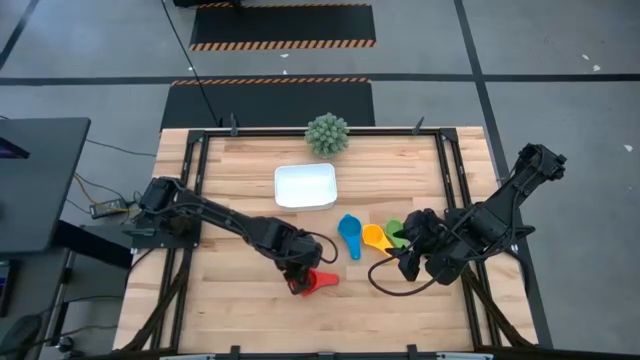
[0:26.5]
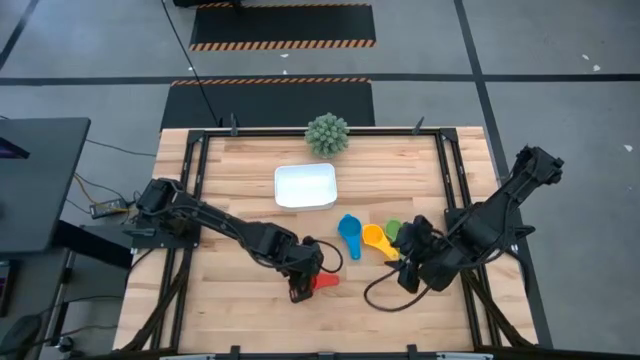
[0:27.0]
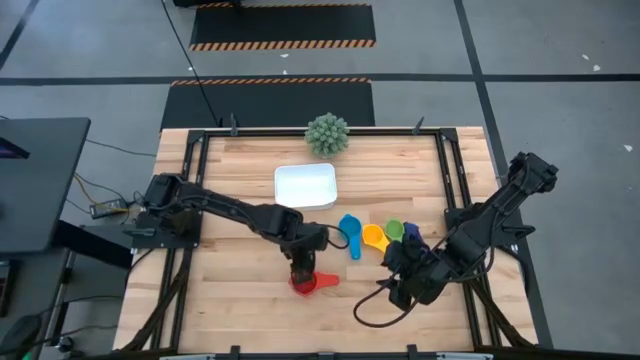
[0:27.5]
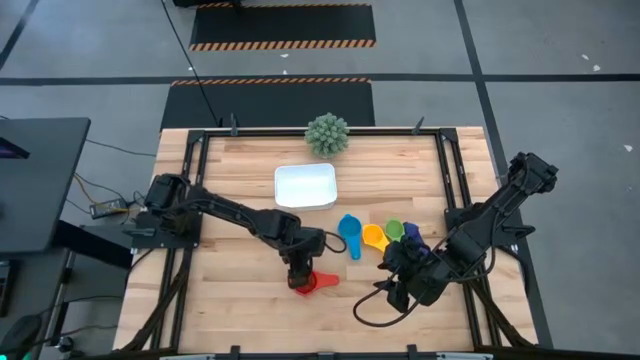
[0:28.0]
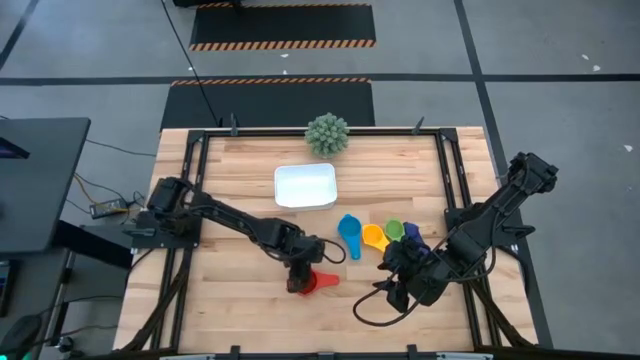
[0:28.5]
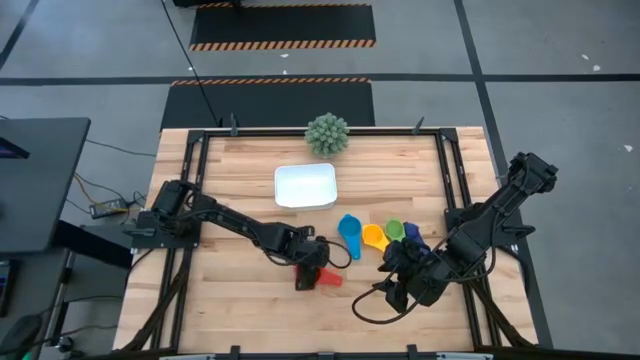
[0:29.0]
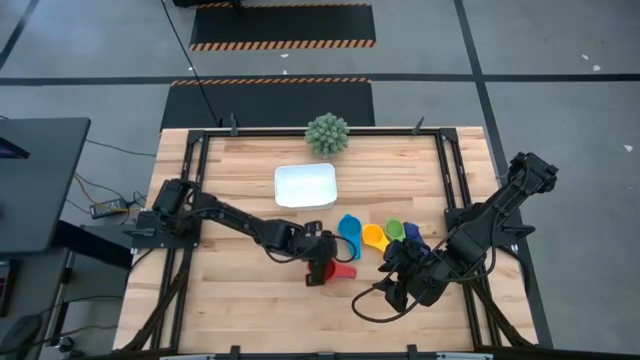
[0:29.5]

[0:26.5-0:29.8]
Task: Nest measuring cups in basket
Adjust the stacked measuring cups

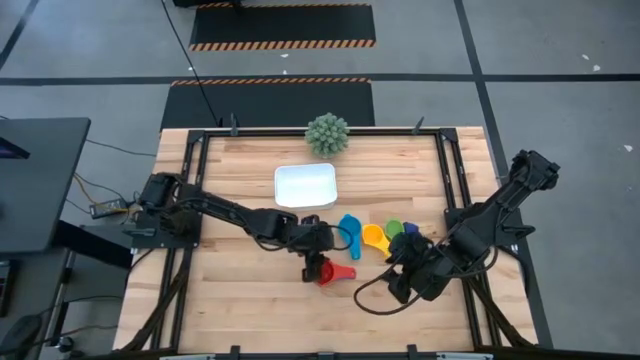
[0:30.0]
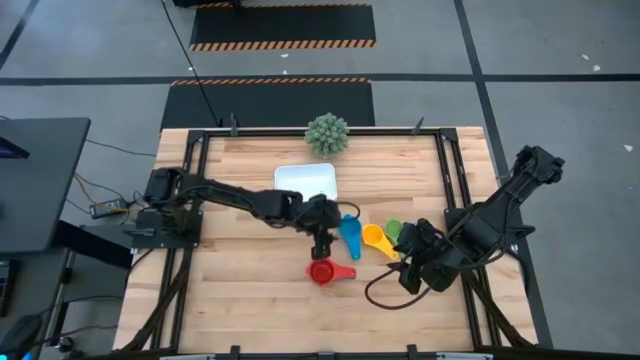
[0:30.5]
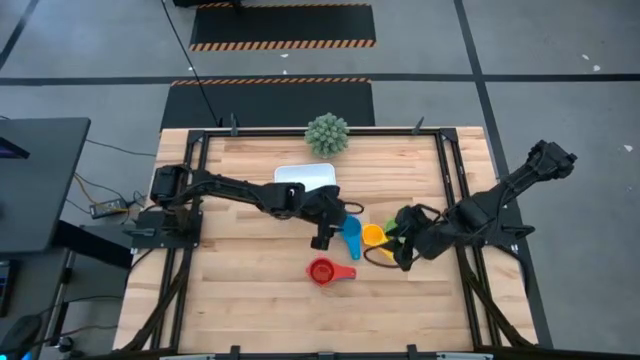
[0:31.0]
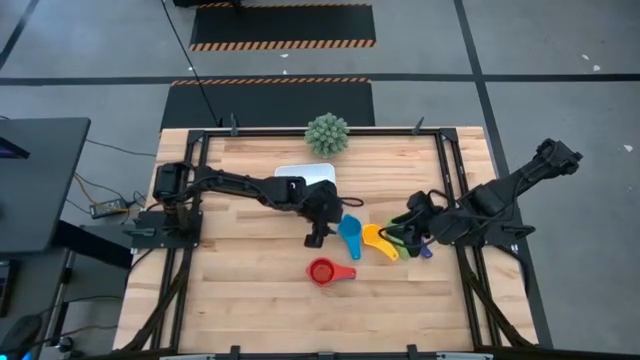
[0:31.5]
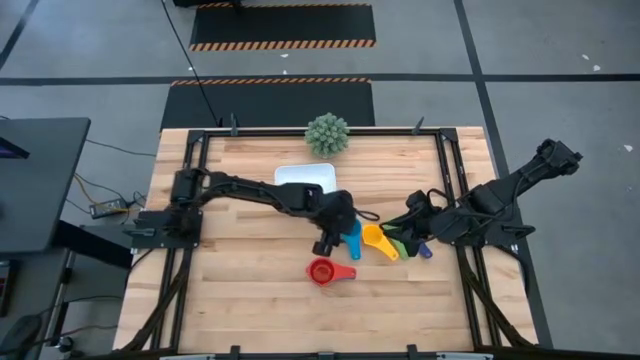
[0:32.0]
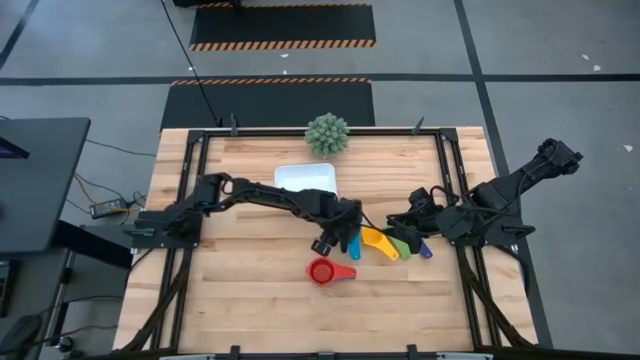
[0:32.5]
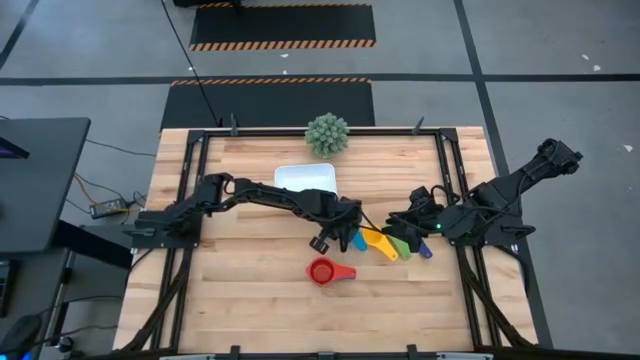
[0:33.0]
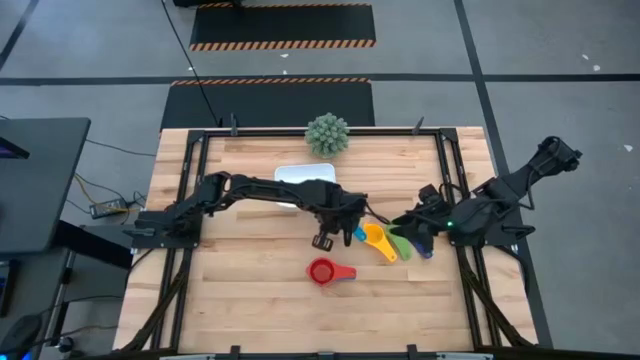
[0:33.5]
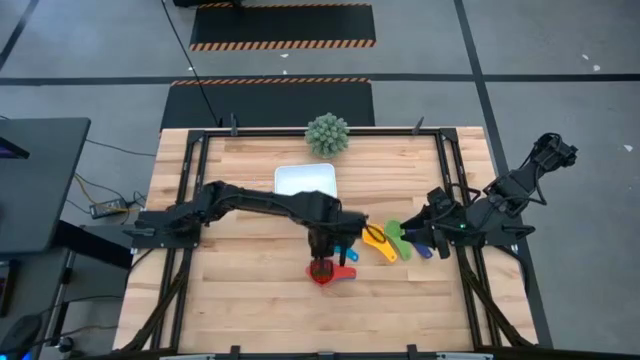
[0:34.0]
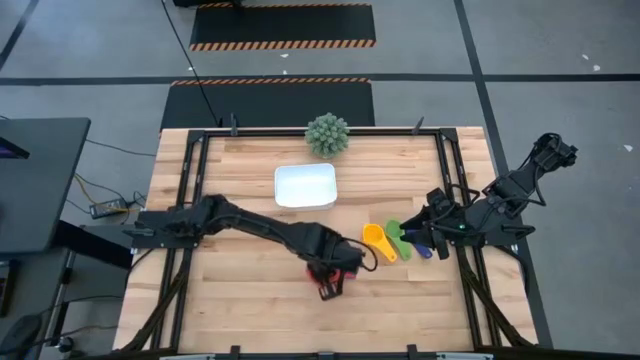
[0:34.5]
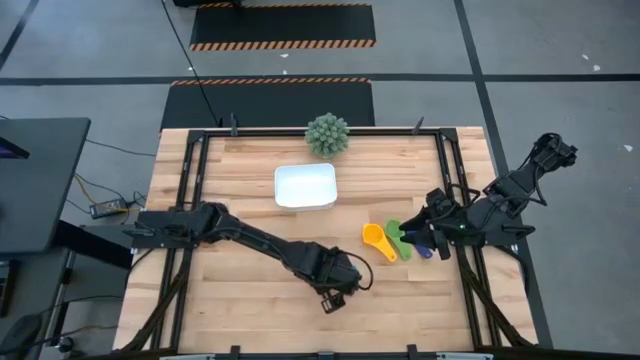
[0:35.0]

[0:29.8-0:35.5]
Stack the light blue measuring cups into the red measuring cup

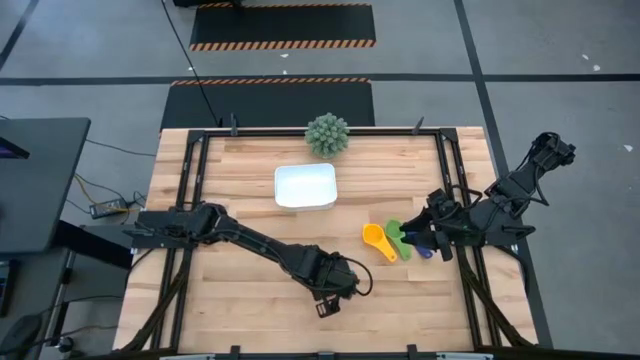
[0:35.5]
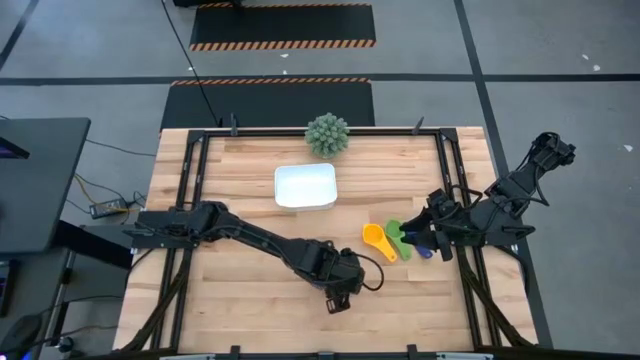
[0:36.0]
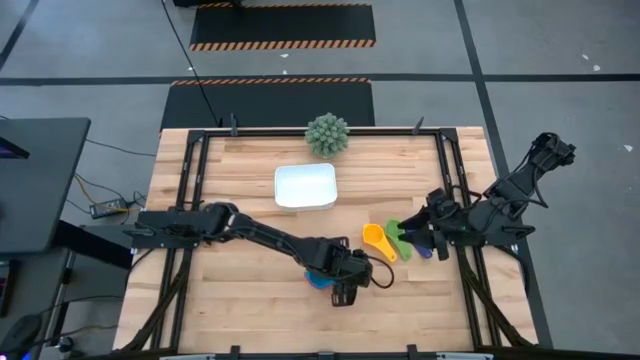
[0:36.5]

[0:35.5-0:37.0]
Adjust the stacked measuring cups

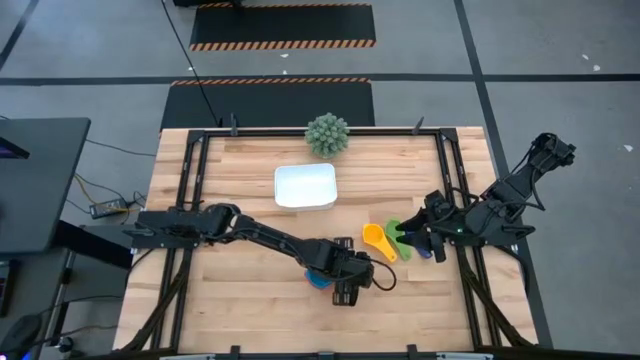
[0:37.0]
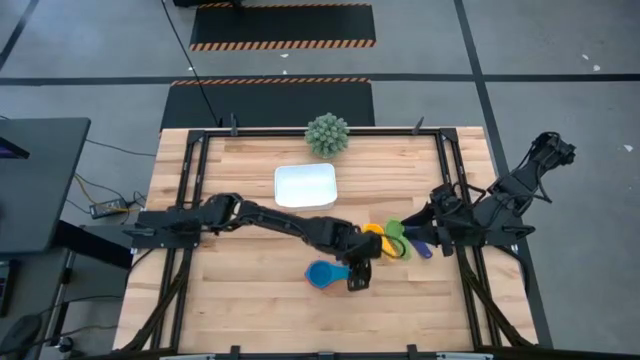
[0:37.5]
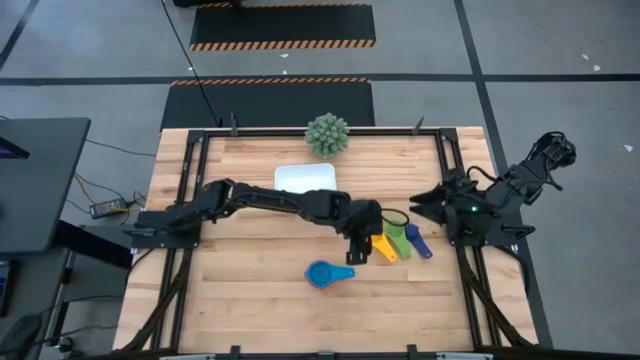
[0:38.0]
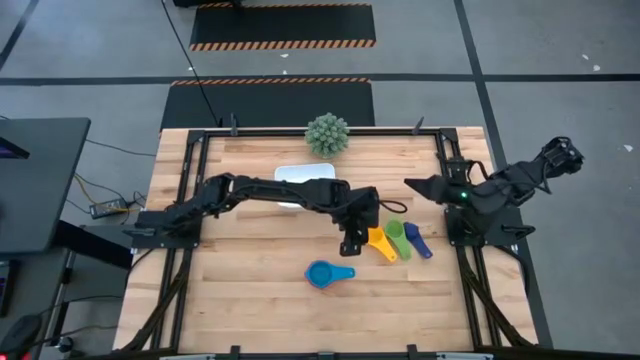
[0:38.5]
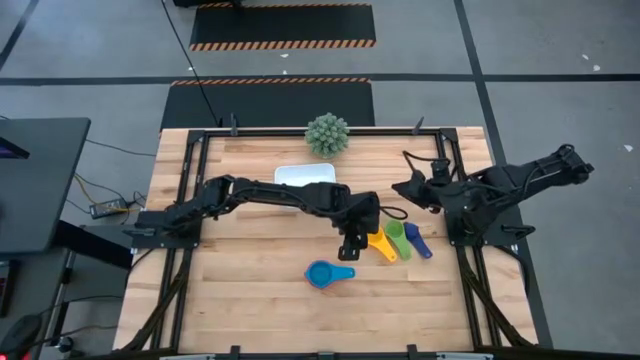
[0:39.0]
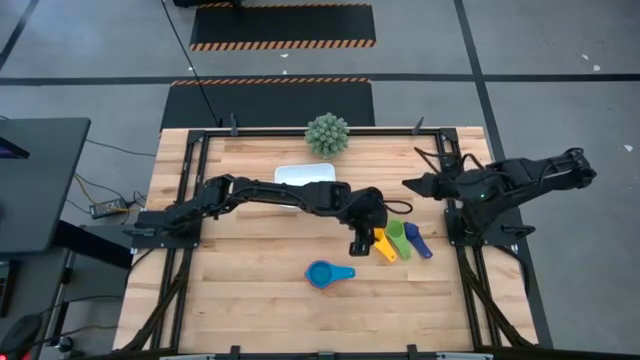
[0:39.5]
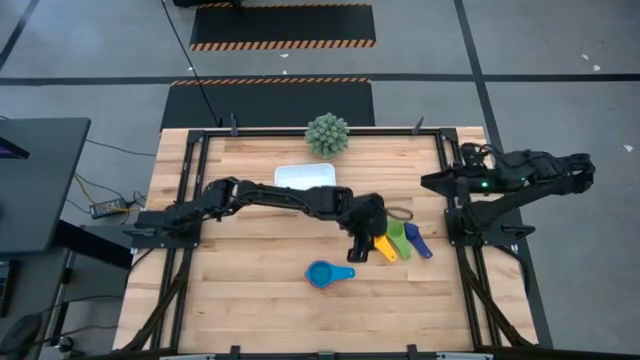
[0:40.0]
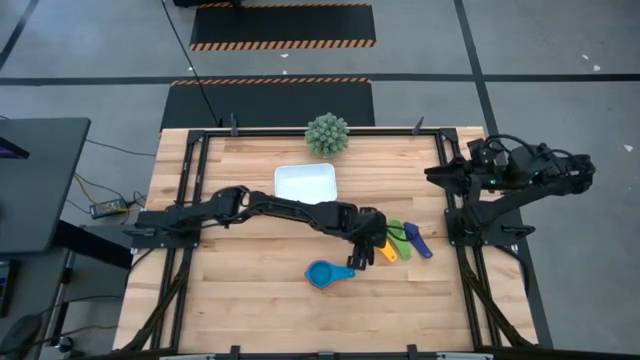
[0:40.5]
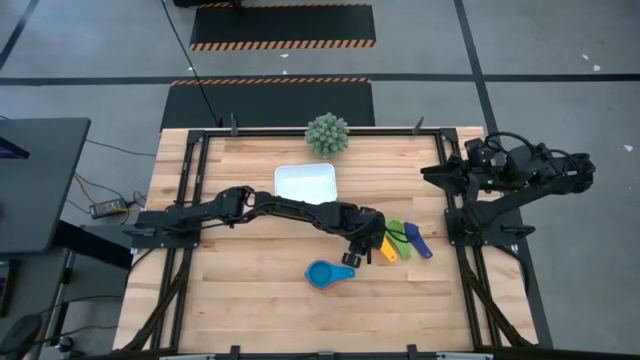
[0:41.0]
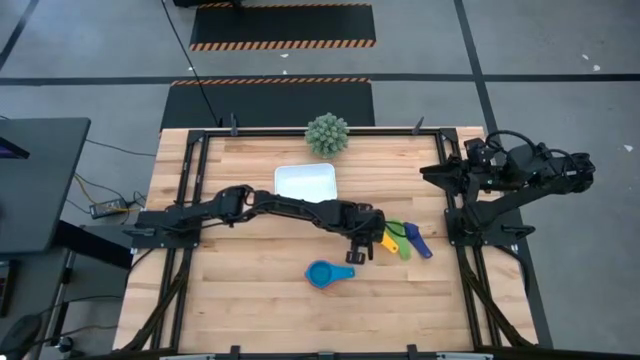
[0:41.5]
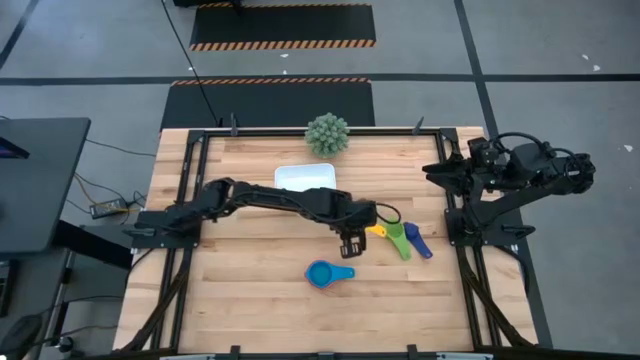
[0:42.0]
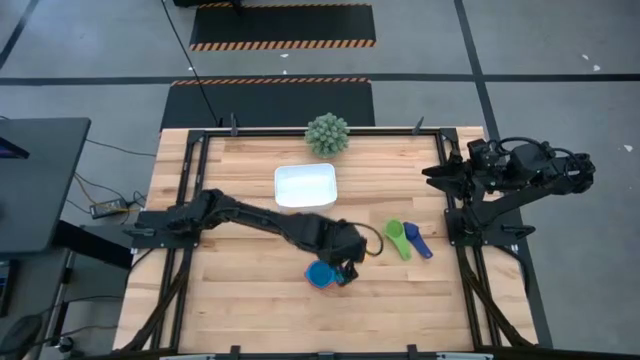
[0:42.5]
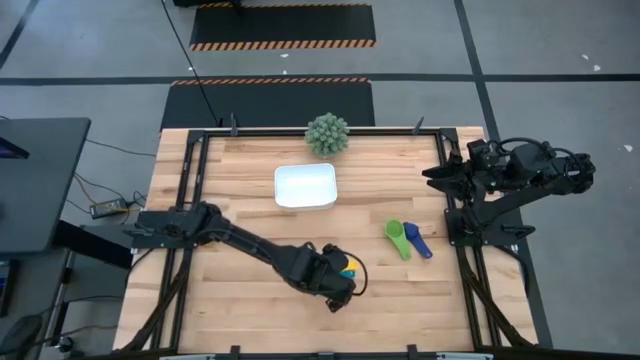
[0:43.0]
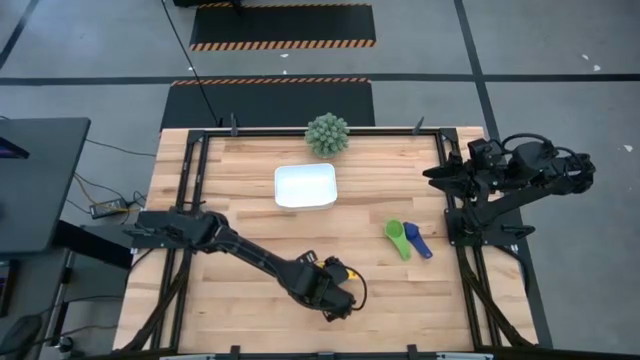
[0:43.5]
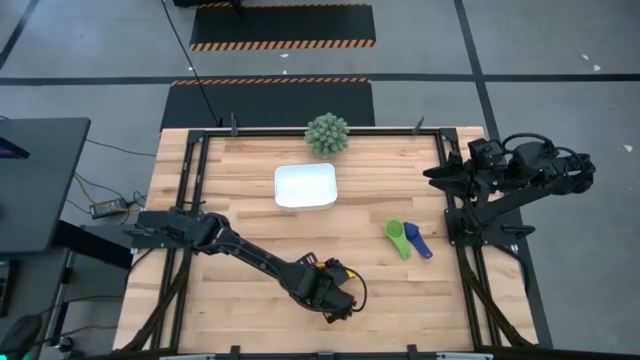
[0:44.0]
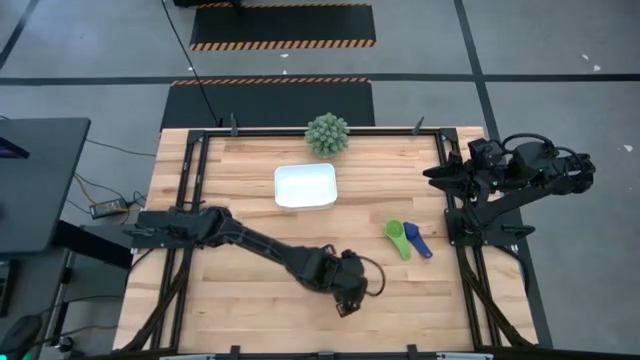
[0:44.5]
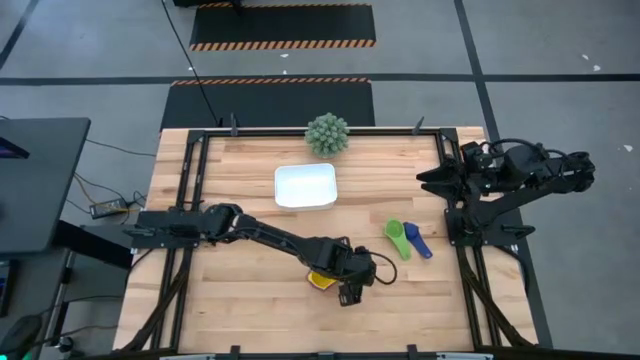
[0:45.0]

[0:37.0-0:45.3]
Stack the yellow measuring cup into the light blue measuring cup

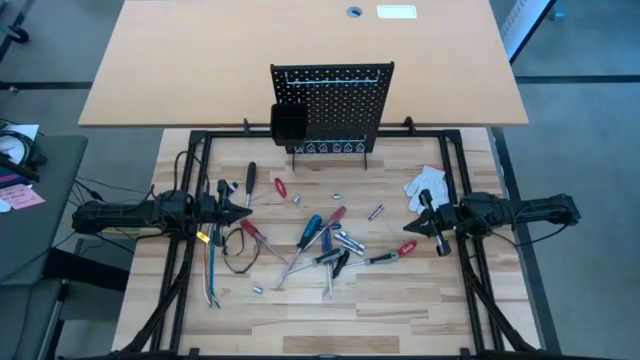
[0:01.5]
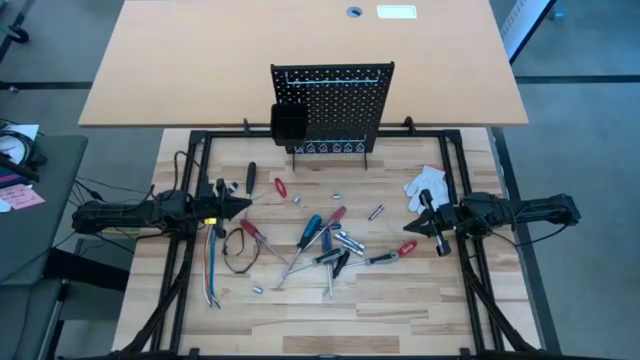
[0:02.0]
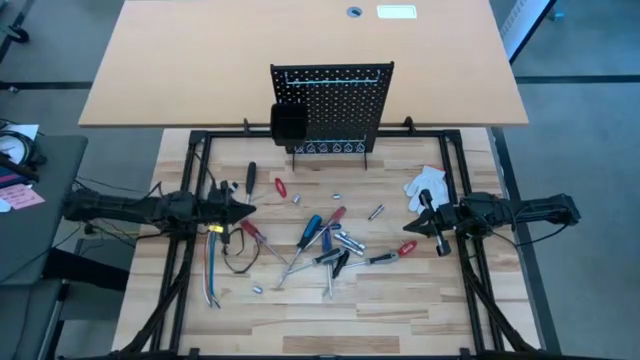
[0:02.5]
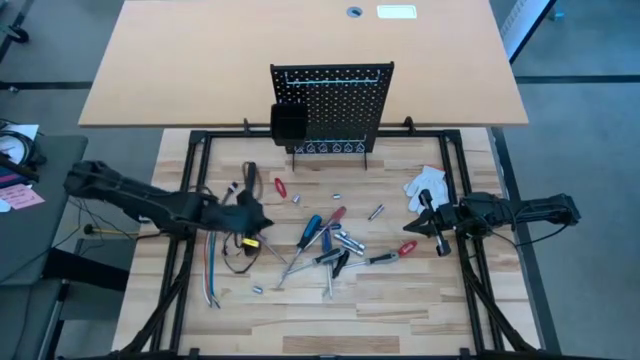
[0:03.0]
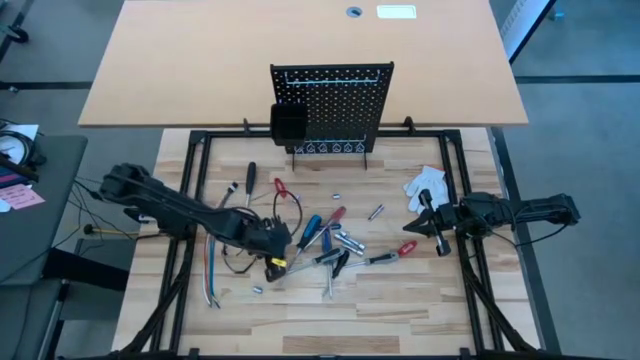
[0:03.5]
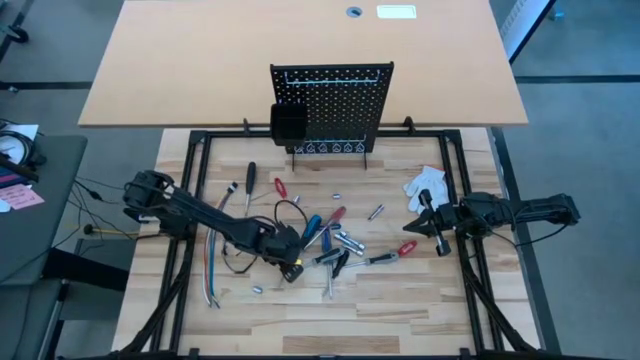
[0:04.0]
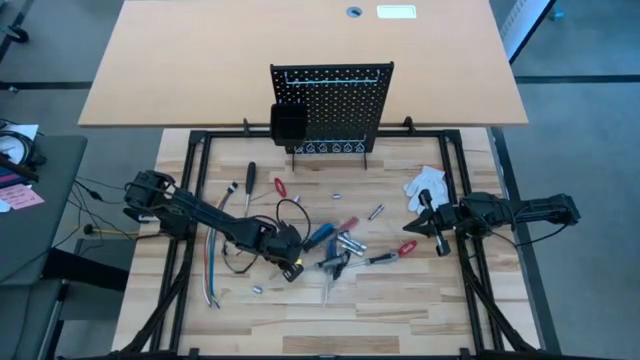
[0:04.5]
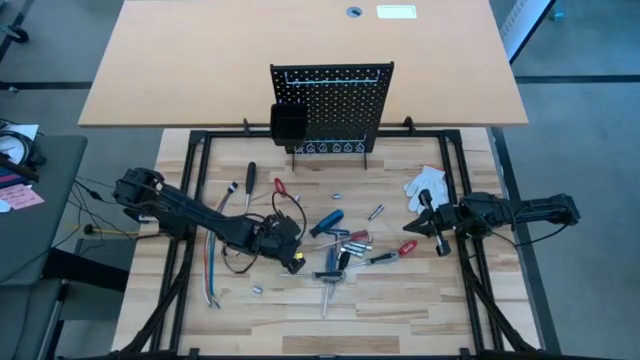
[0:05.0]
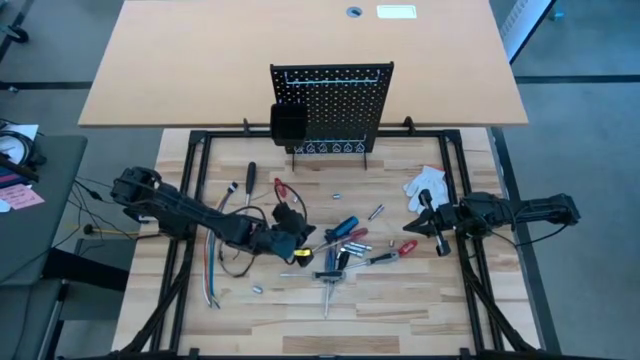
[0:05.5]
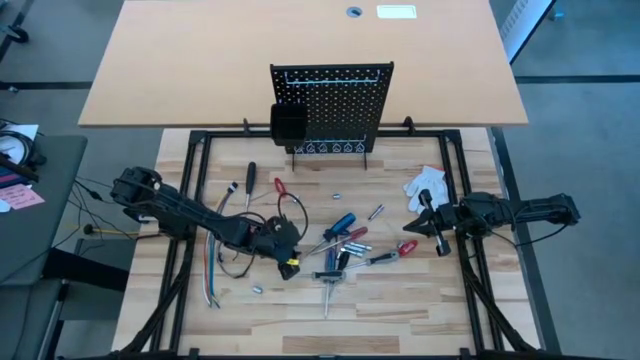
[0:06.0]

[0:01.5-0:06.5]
Task: Hang tools onto peg board
Hang the black screwdriver on the black pegboard
